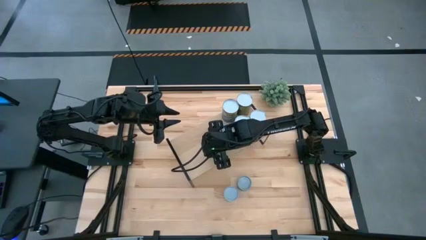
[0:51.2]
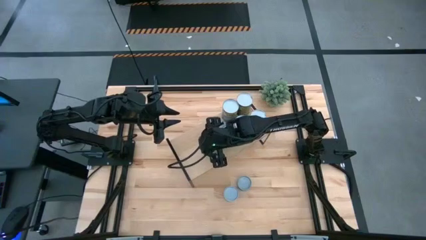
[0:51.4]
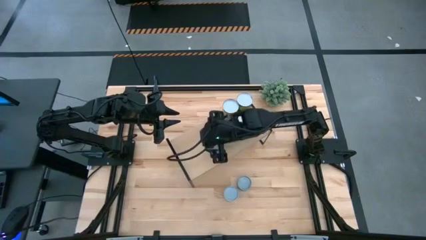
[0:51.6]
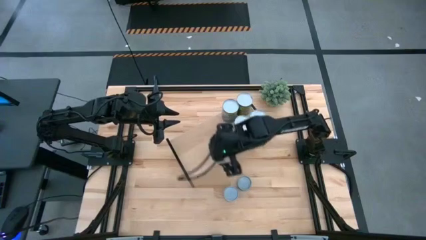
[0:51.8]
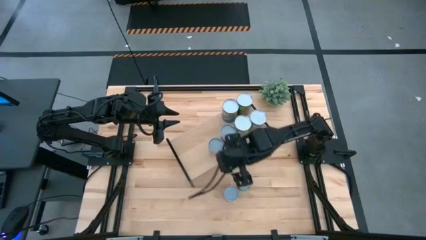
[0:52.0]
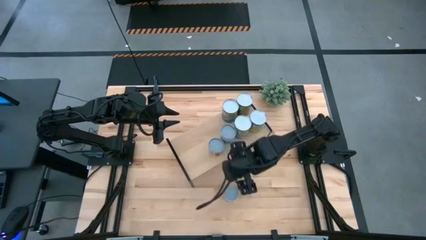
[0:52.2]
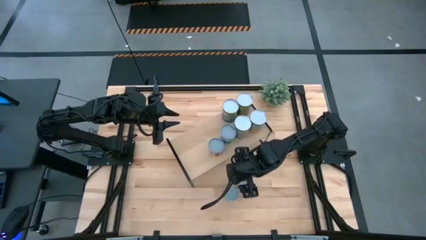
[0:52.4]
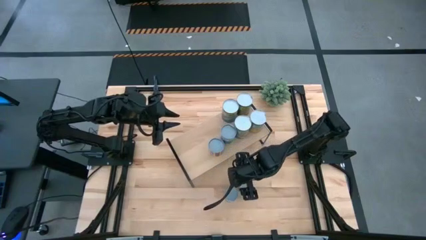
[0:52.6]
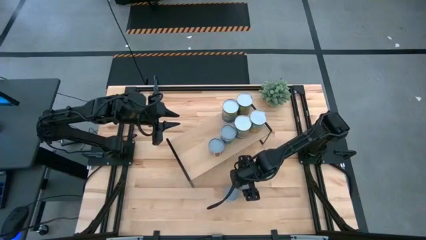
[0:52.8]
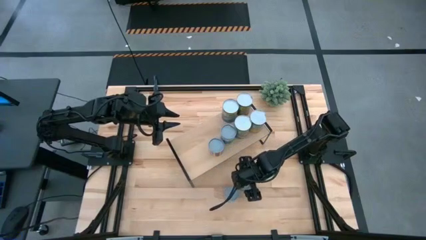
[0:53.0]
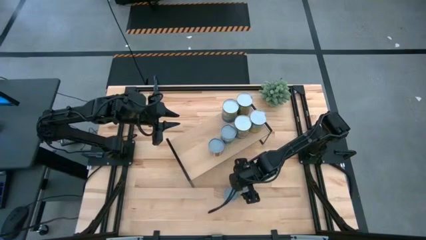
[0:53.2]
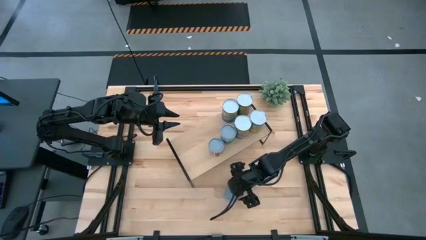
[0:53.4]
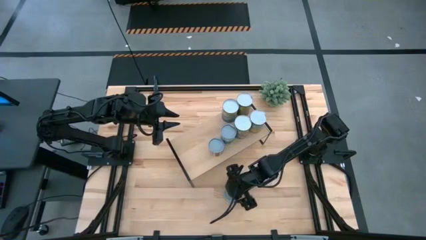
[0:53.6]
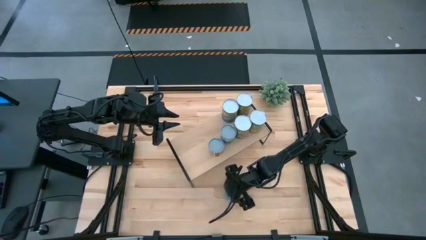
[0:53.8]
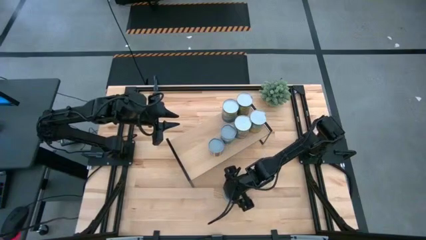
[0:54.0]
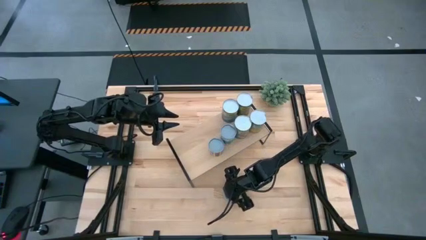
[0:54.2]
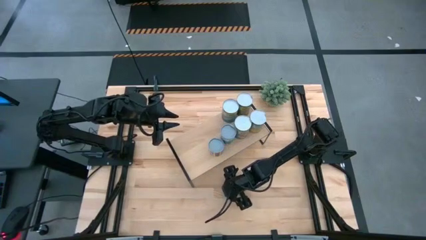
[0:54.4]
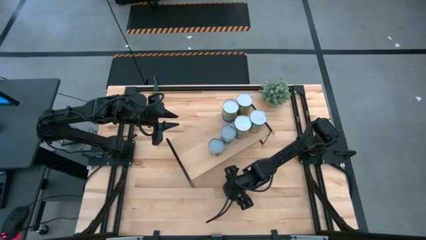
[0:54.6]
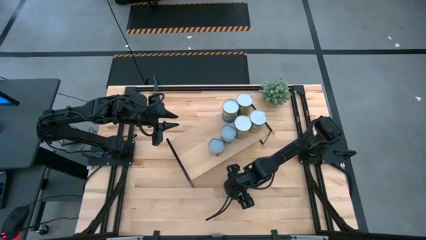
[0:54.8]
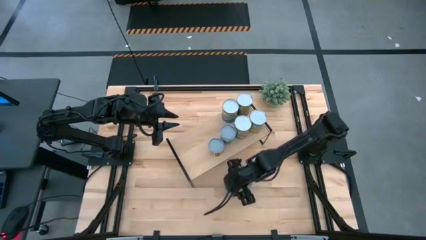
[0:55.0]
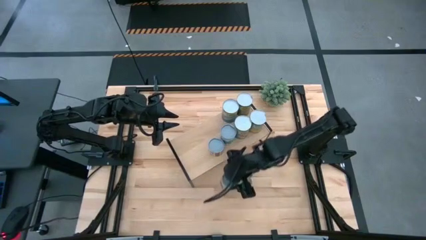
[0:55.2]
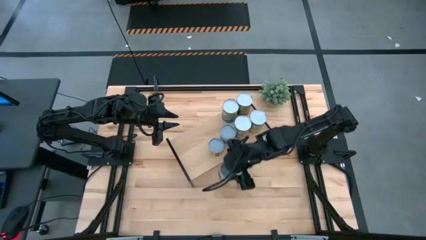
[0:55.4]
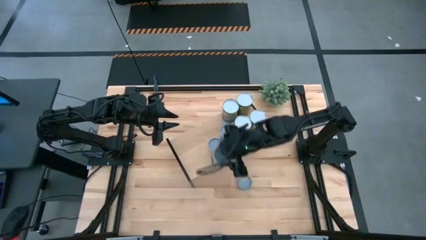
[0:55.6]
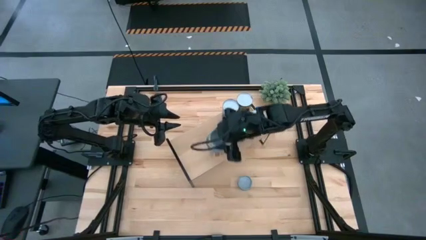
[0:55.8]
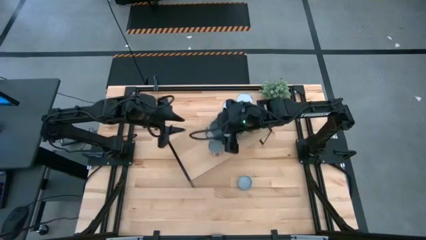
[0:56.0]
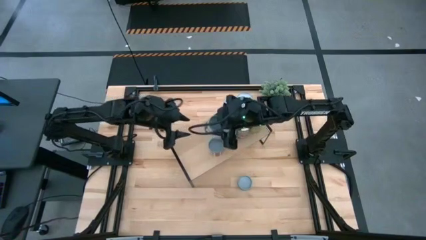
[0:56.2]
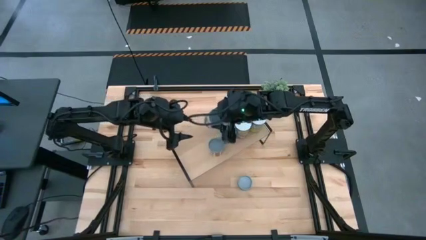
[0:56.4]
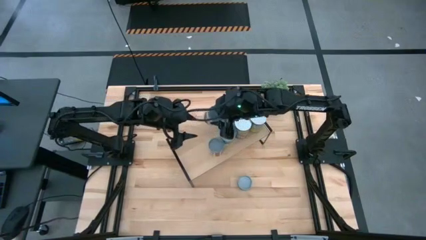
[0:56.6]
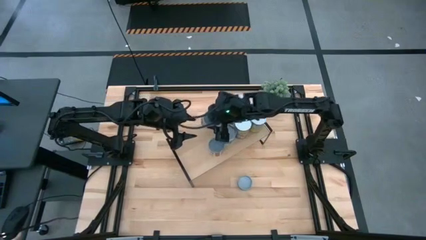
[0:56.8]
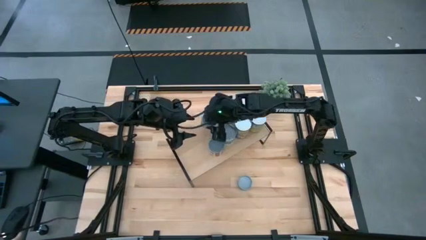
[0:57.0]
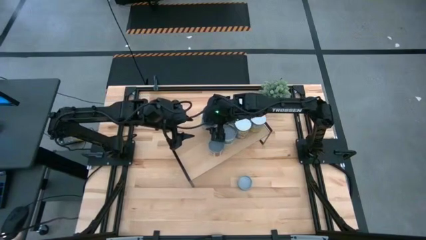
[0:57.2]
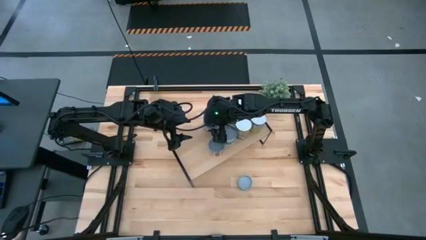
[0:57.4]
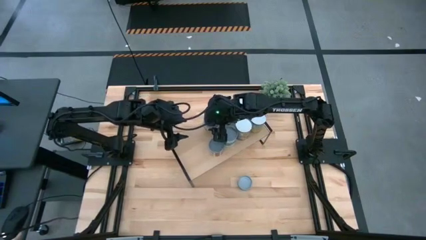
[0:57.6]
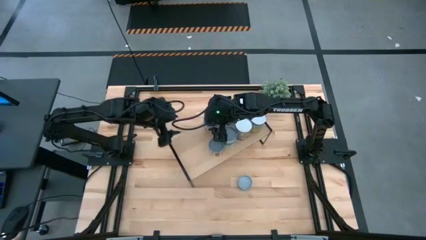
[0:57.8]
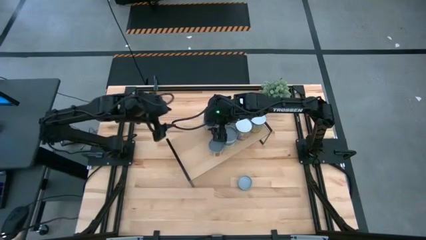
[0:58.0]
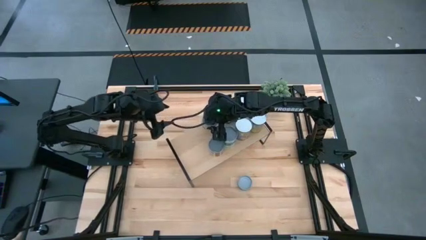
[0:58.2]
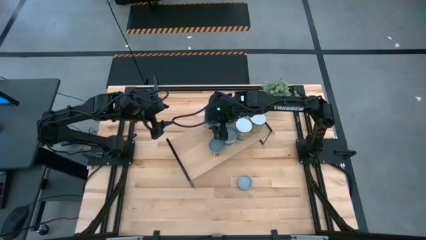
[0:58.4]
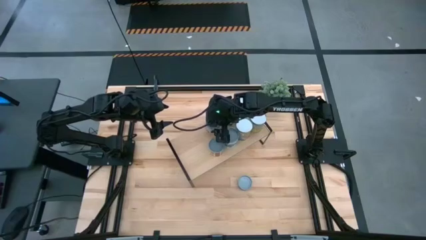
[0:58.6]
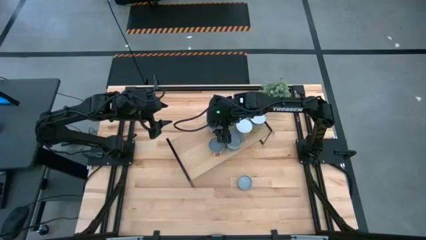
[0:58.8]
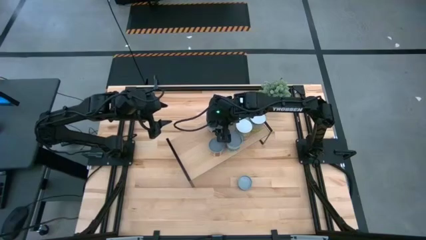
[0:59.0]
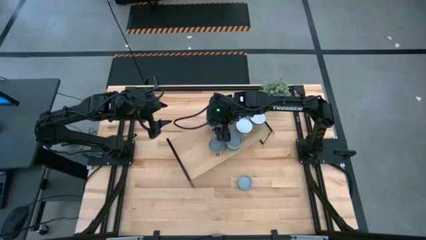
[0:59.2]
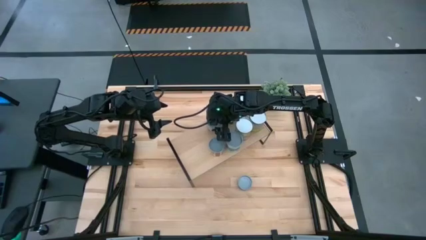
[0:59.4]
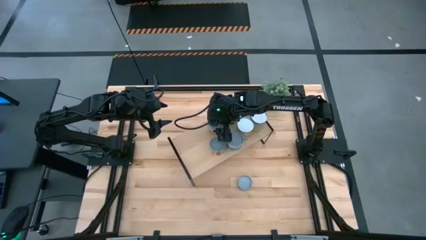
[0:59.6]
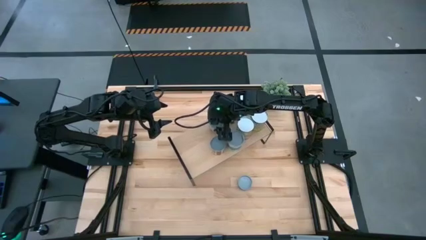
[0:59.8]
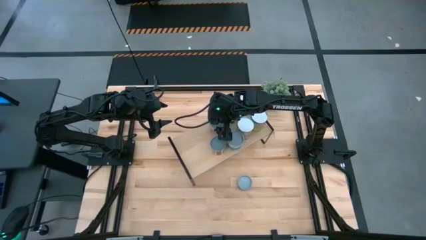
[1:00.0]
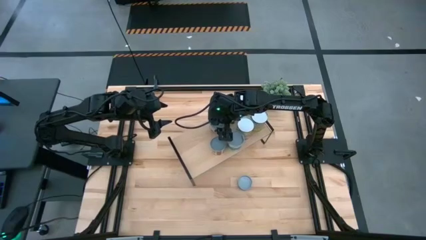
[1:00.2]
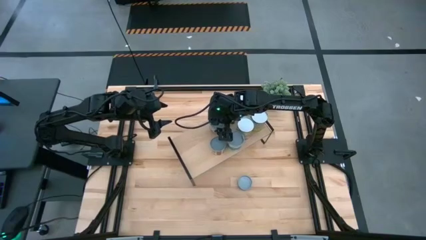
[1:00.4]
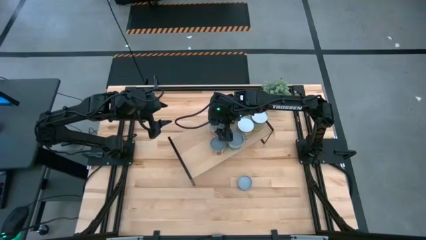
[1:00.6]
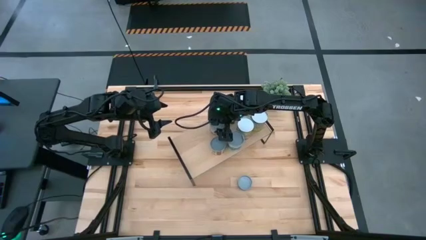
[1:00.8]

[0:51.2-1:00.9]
Task: Pick and place cans onto a shelf
Put the small canned peas on the shelf aligned with the other big canned mixed vegetables

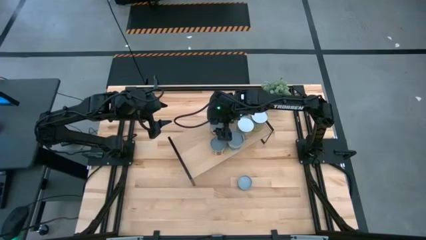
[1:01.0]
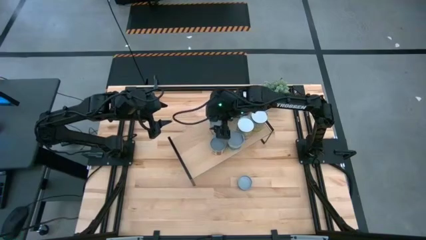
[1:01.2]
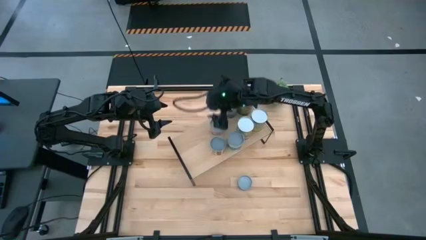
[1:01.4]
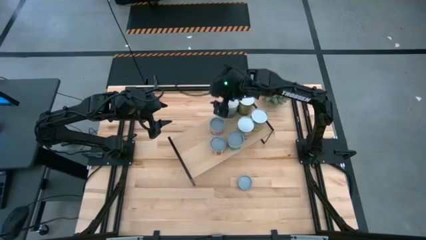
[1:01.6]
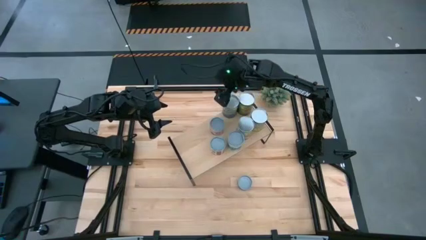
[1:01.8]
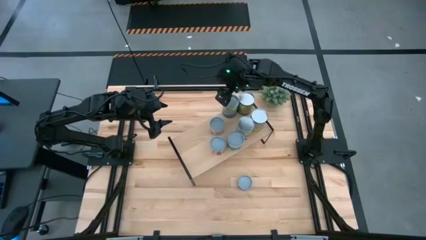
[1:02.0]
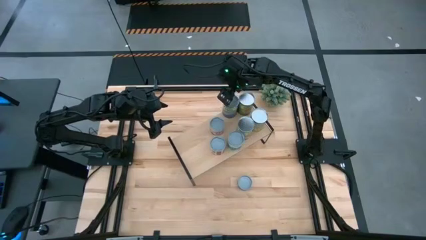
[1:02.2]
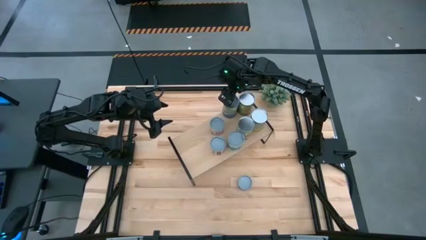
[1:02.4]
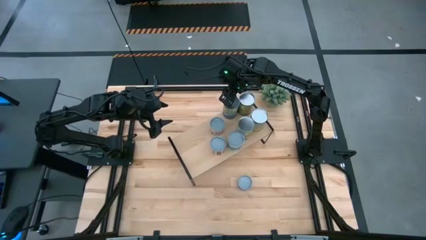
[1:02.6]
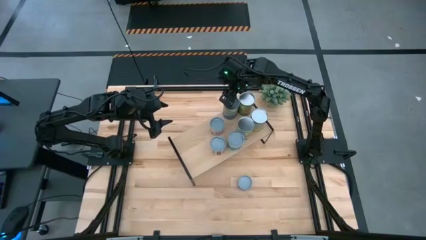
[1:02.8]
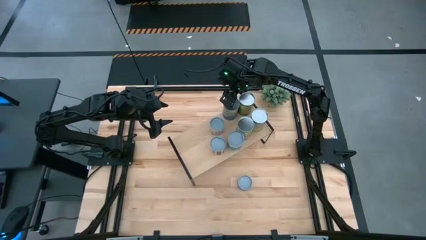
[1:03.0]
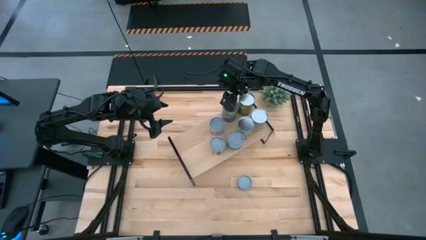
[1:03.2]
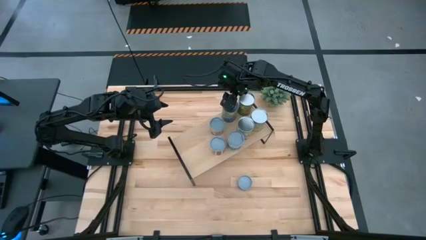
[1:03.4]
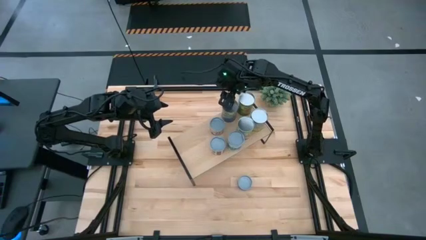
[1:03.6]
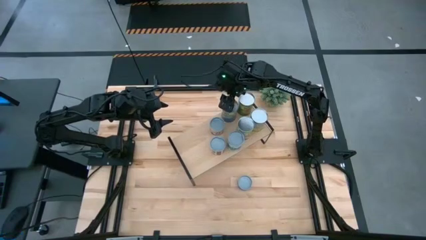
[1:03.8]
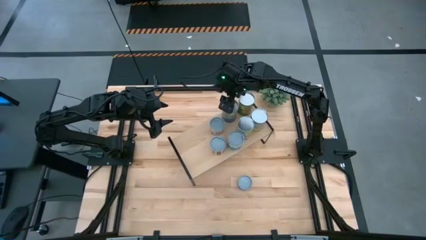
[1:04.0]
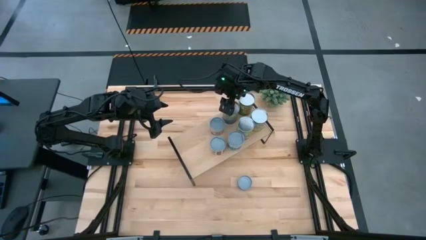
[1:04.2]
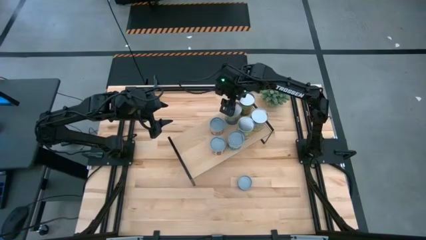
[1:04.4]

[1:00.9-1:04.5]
Adjust the big canned peas on the shelf

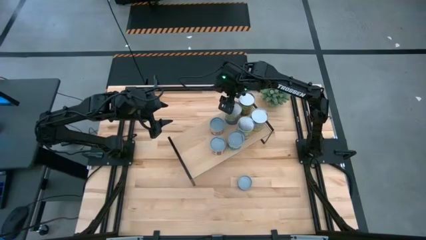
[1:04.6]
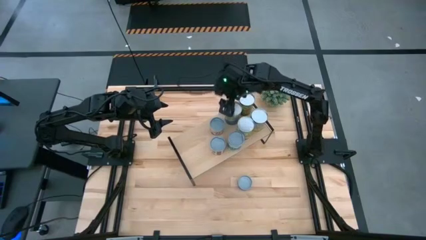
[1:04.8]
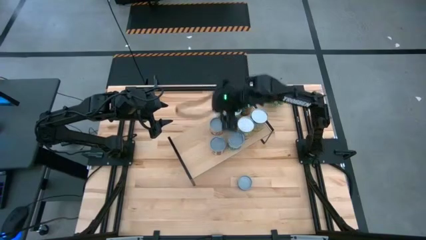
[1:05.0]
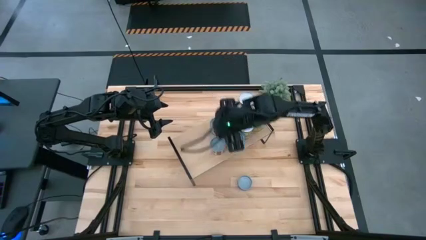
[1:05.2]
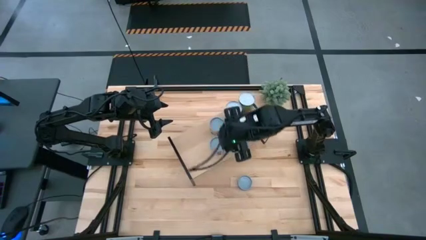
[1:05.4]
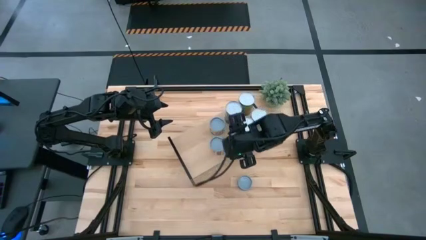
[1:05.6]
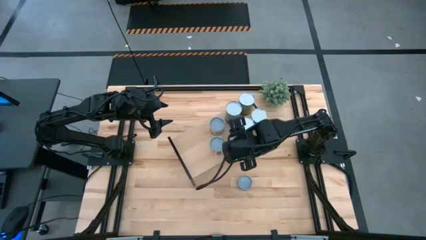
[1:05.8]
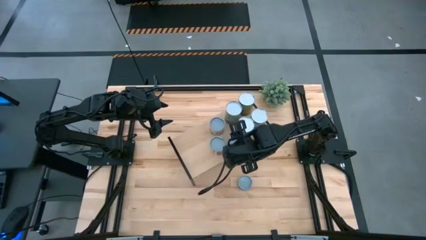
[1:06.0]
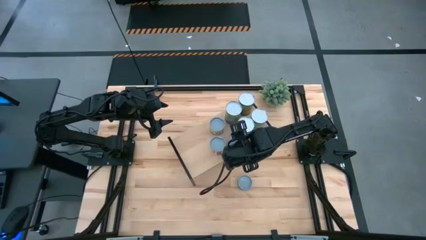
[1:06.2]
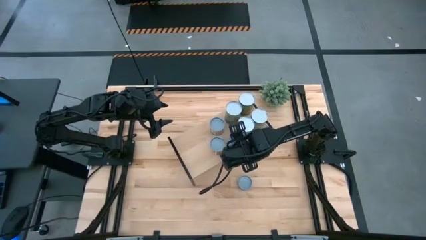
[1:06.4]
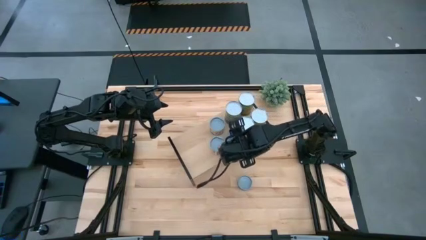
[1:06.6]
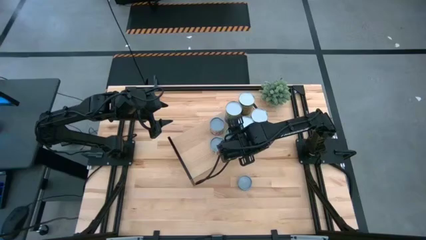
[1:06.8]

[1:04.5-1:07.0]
Adjust the big canned mixed vegetables on the shelf

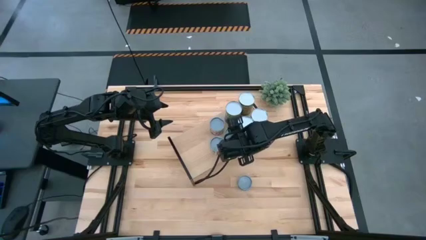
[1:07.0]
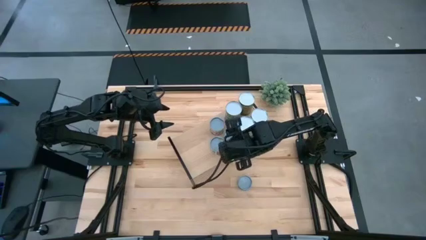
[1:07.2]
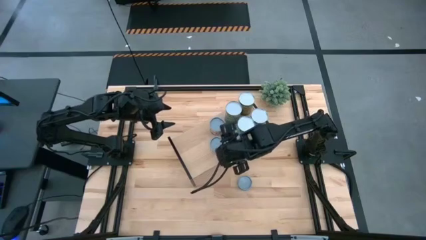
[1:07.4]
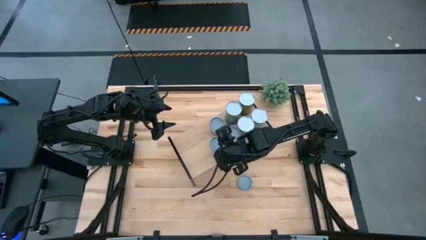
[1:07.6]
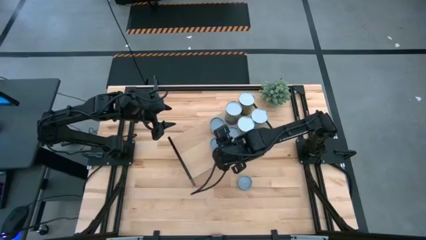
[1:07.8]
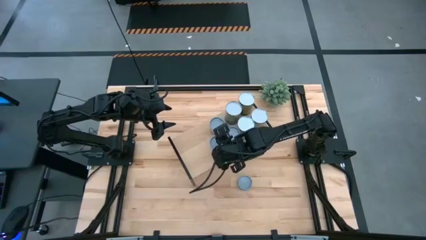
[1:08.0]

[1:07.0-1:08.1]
Adjust the small canned diced tomatoes on the shelf
